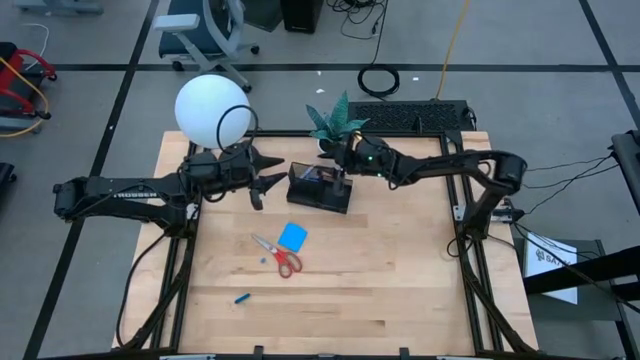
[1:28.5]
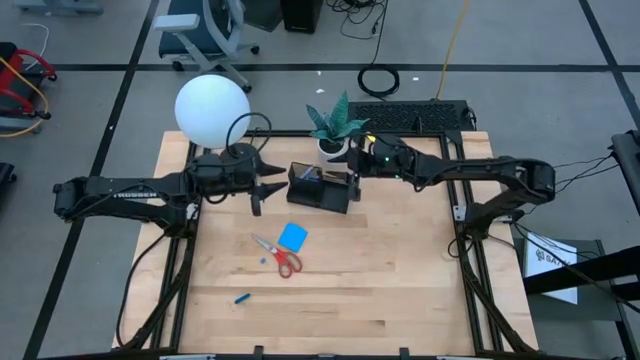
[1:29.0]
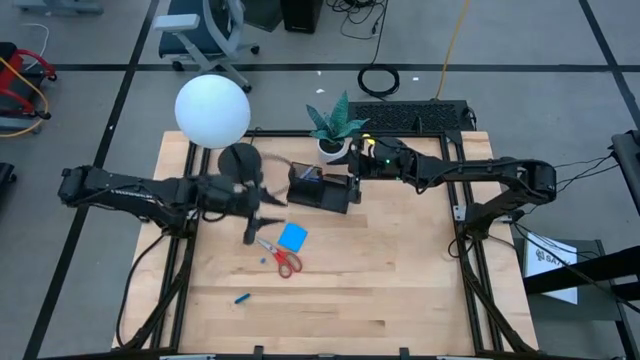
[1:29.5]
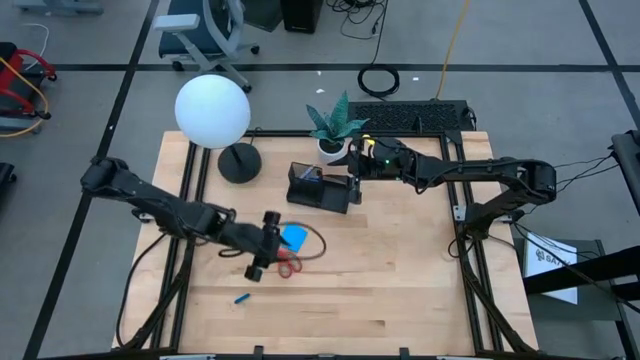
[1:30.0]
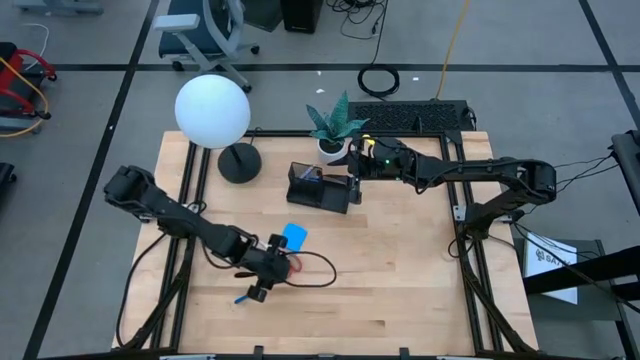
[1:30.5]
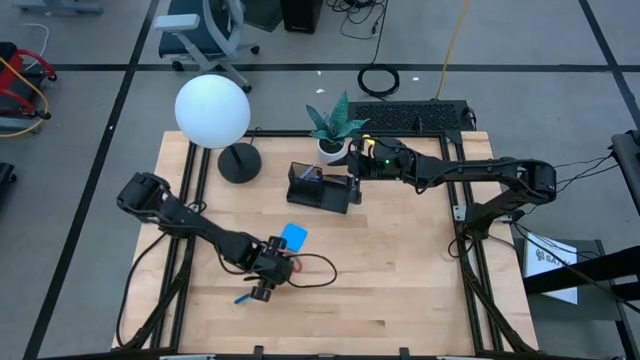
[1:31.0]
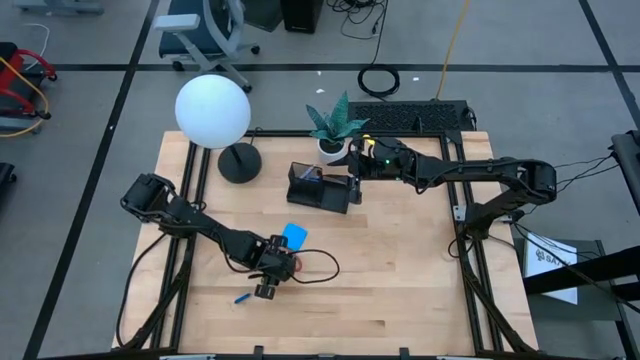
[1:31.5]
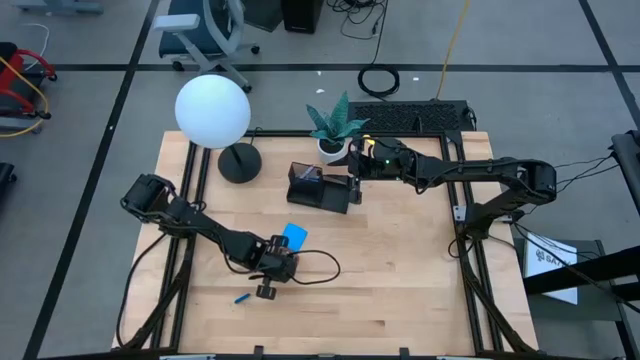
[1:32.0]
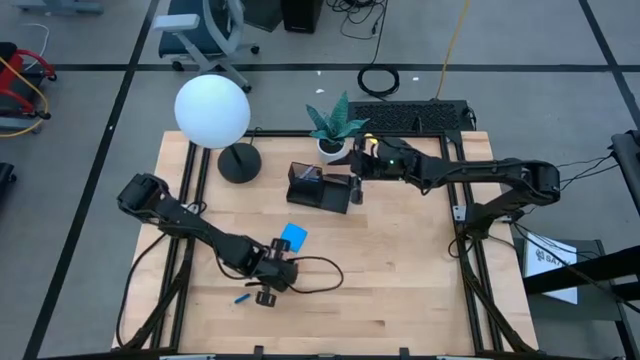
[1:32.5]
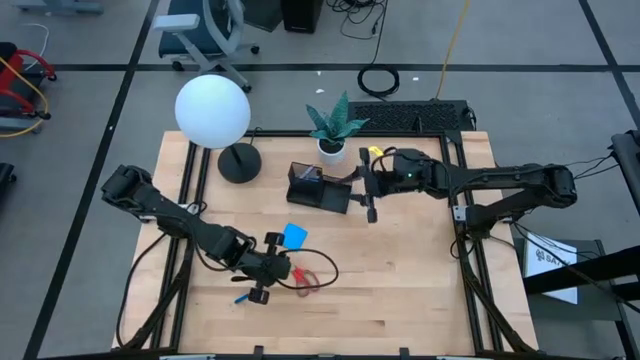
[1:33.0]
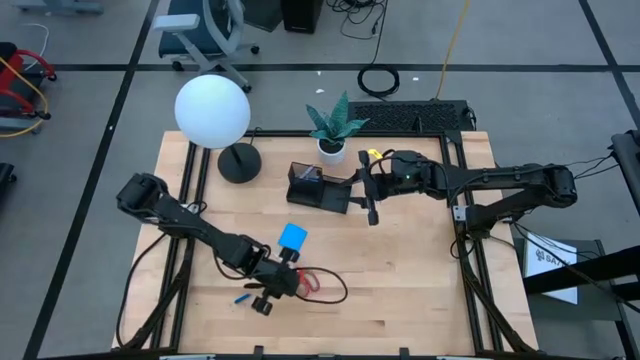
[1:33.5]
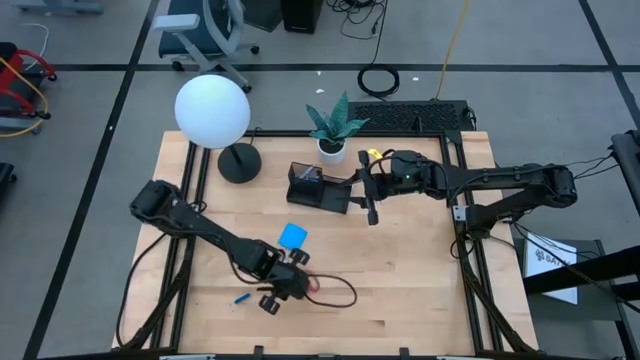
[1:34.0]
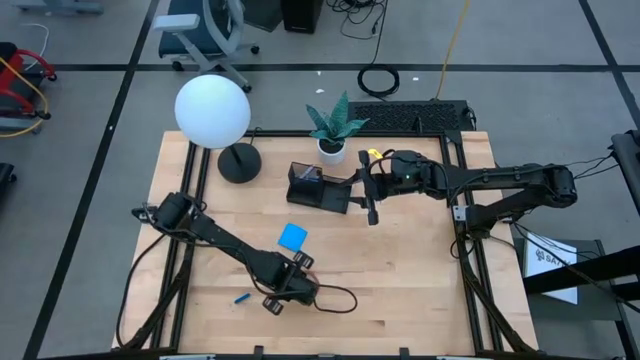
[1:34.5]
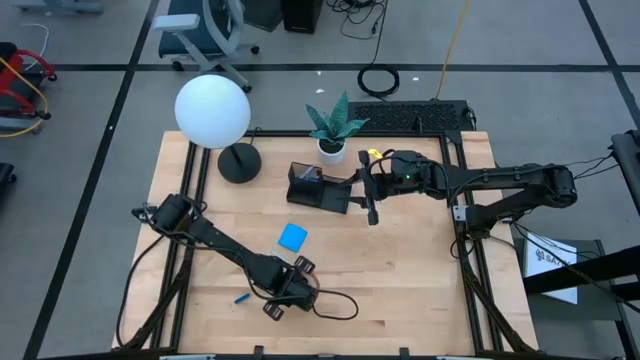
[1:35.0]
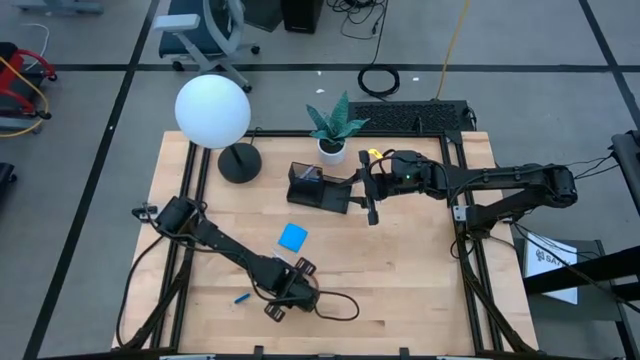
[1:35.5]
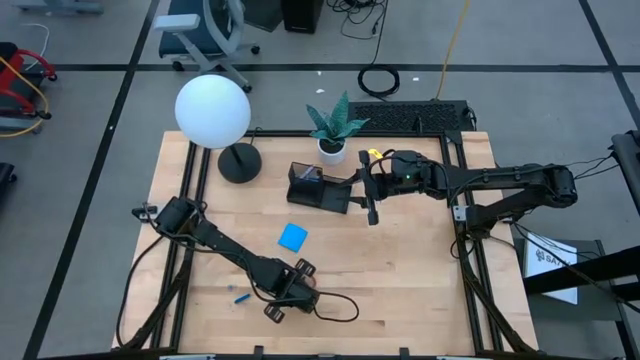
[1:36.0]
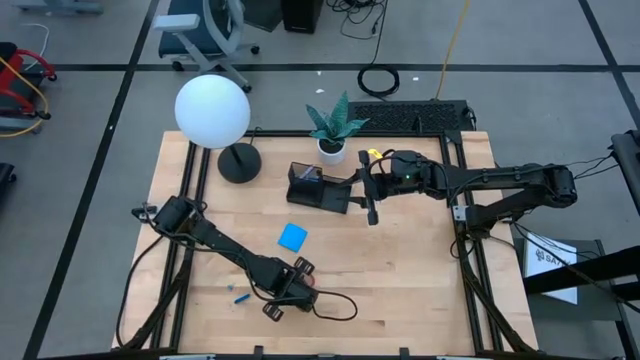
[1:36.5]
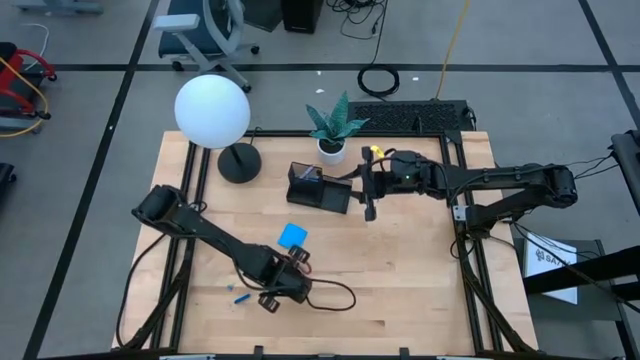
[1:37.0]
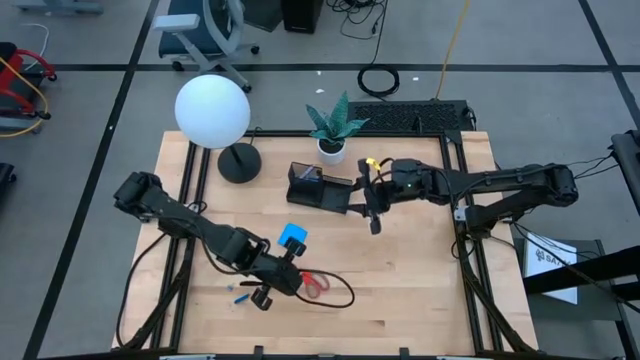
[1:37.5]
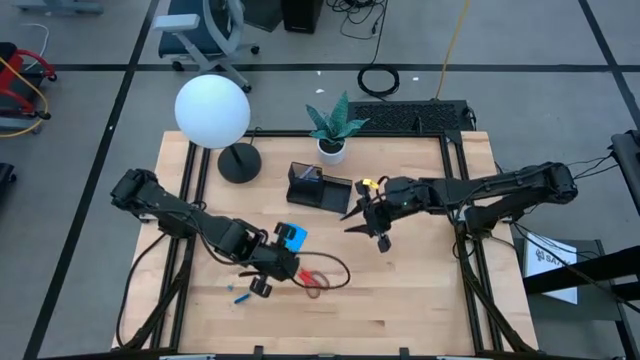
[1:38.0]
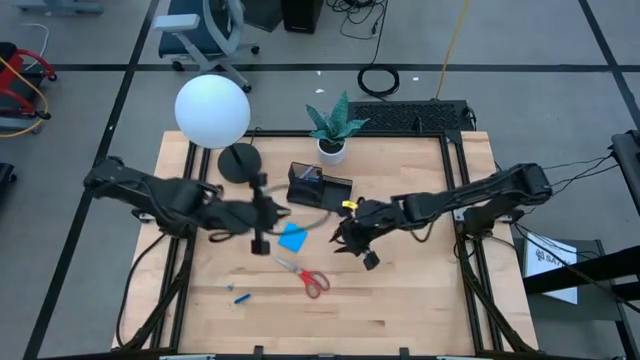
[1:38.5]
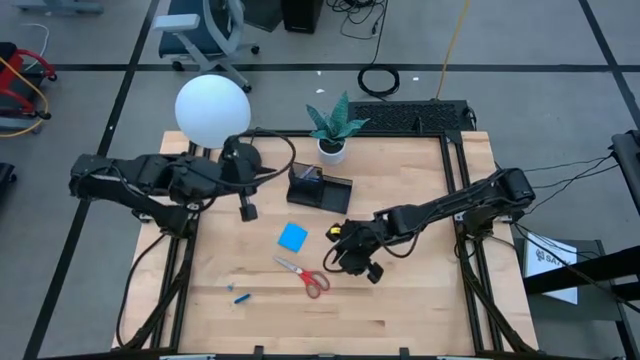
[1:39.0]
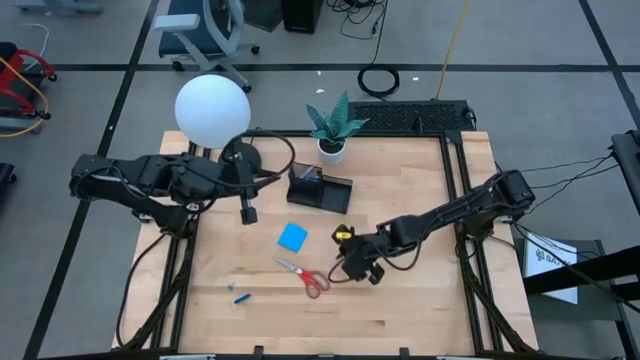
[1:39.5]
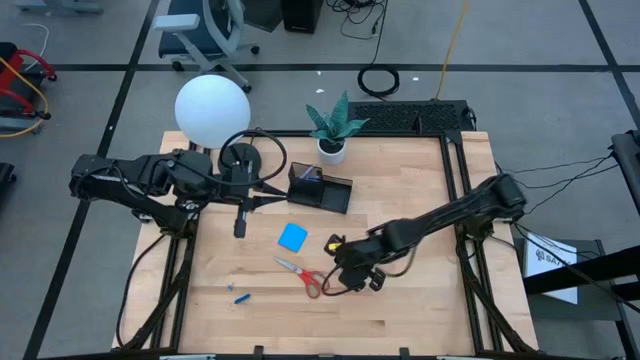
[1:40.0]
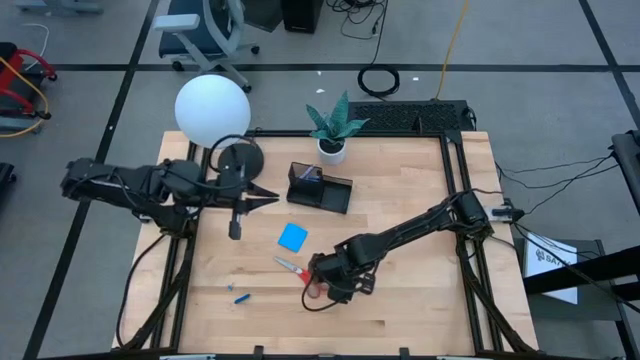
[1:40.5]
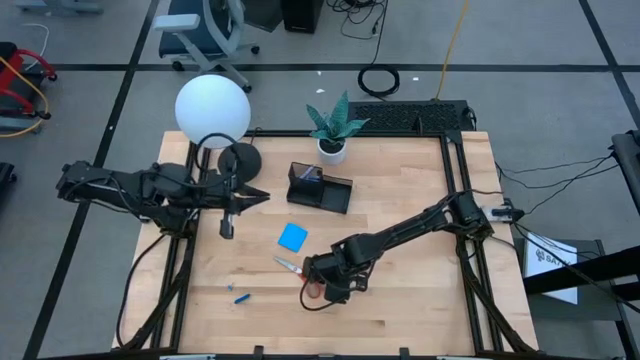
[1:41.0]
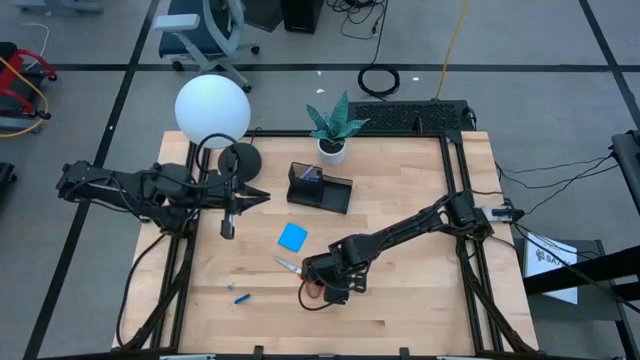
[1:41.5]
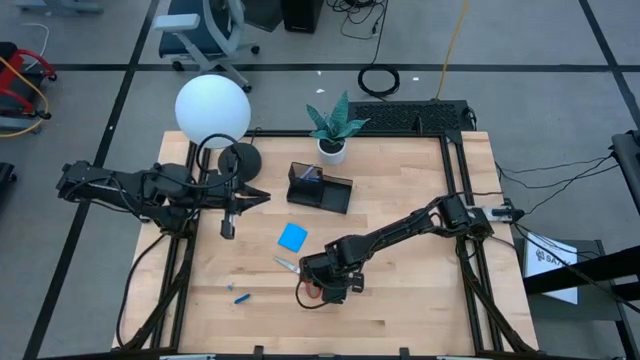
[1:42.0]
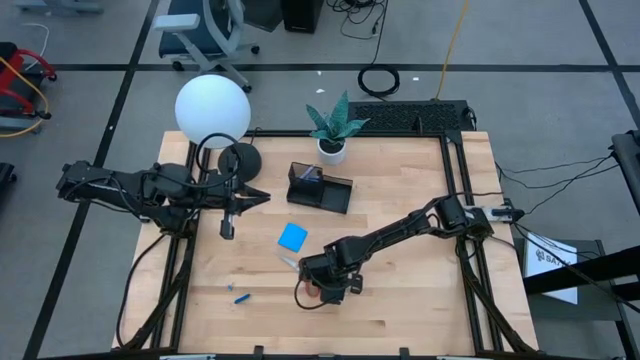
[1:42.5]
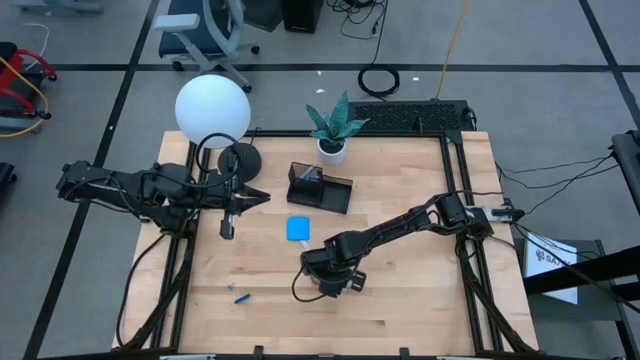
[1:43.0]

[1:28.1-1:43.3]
Task: Pick and place office supplies into organizer
Put the red scissors into the desk organizer

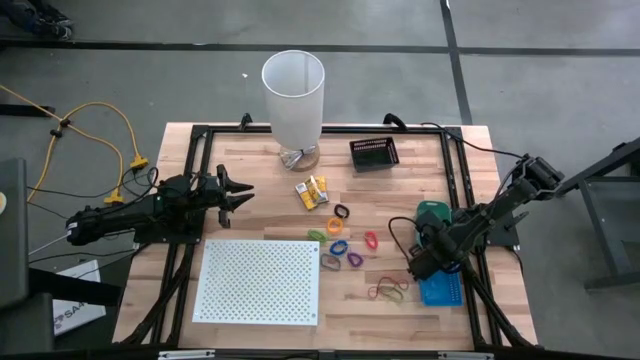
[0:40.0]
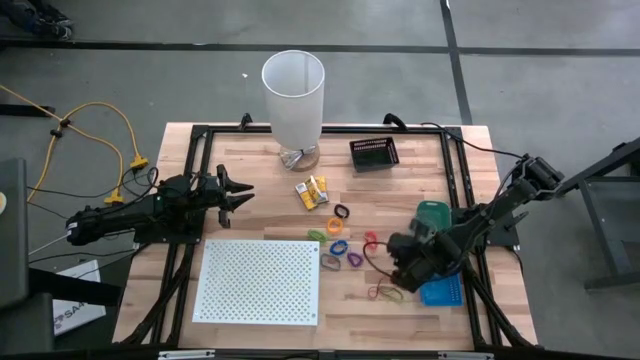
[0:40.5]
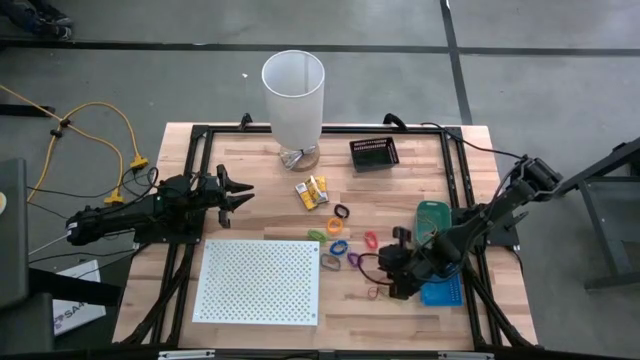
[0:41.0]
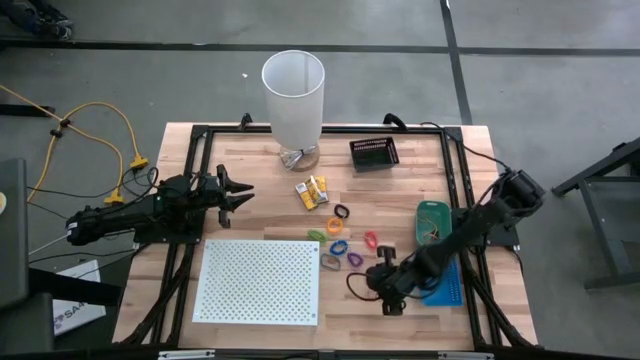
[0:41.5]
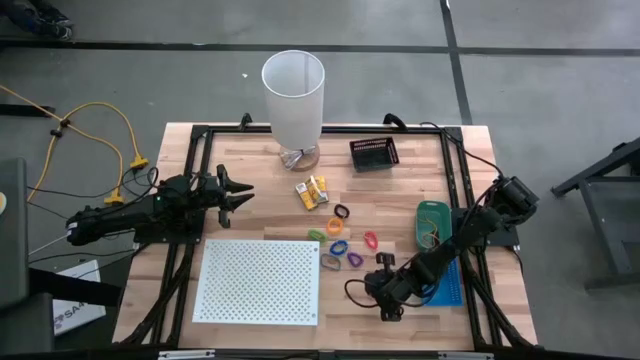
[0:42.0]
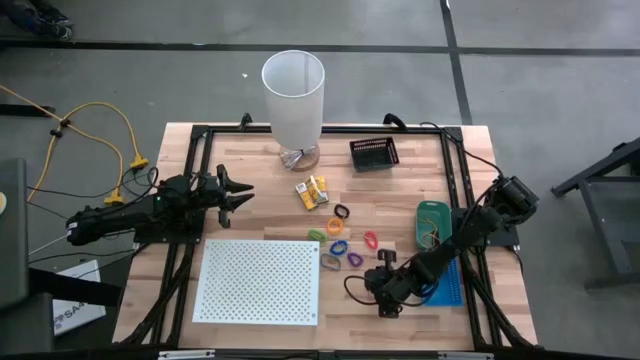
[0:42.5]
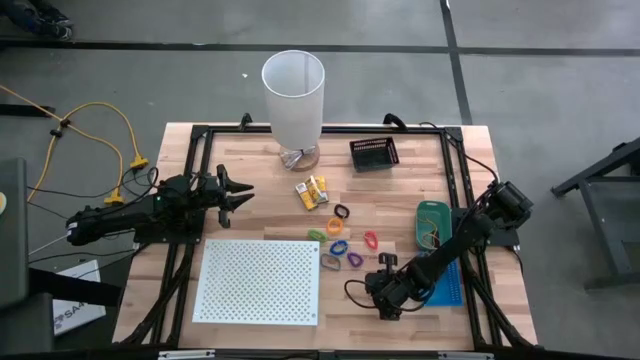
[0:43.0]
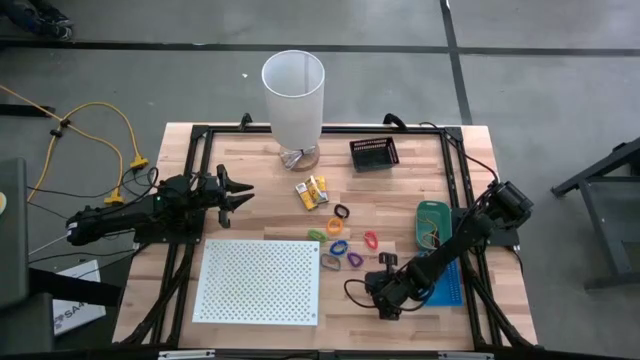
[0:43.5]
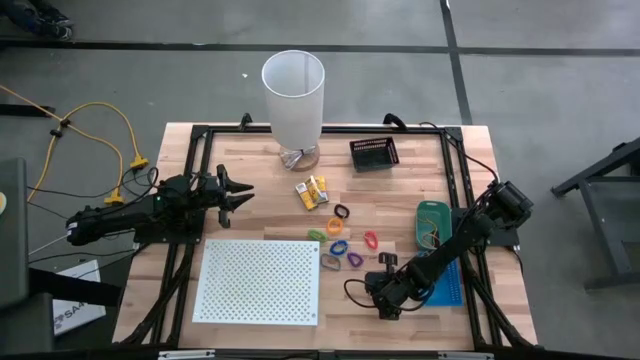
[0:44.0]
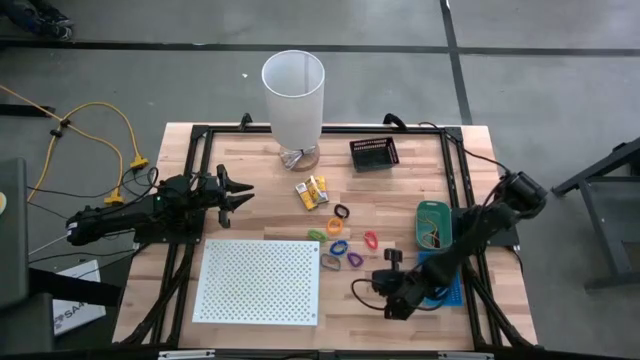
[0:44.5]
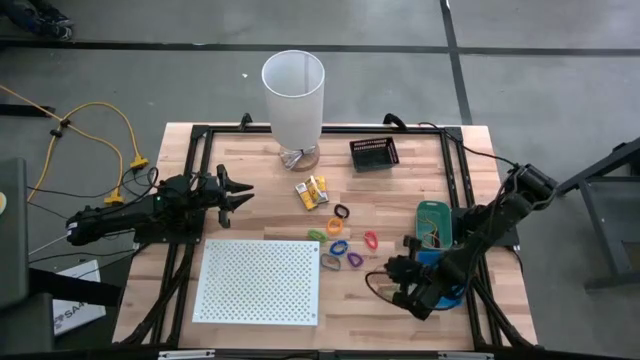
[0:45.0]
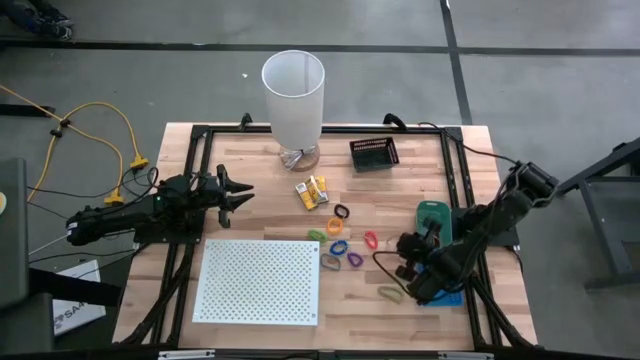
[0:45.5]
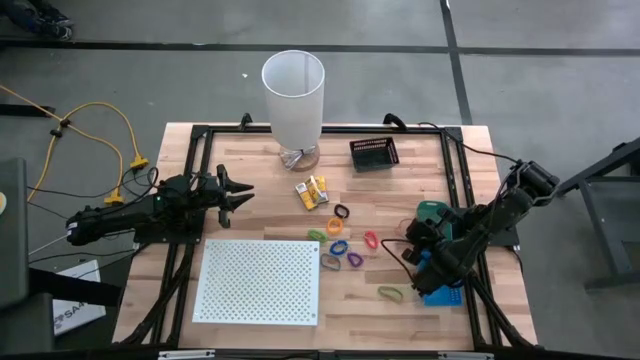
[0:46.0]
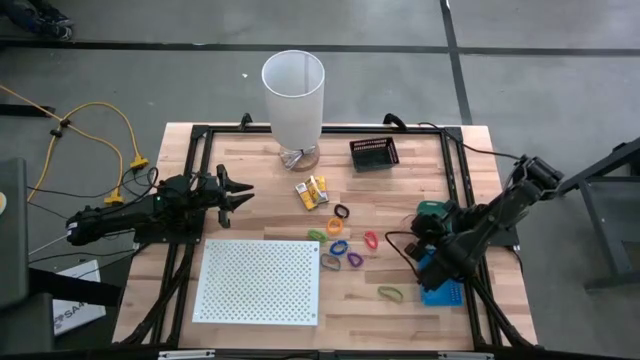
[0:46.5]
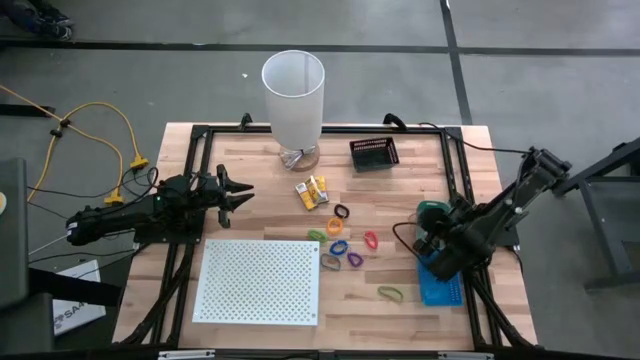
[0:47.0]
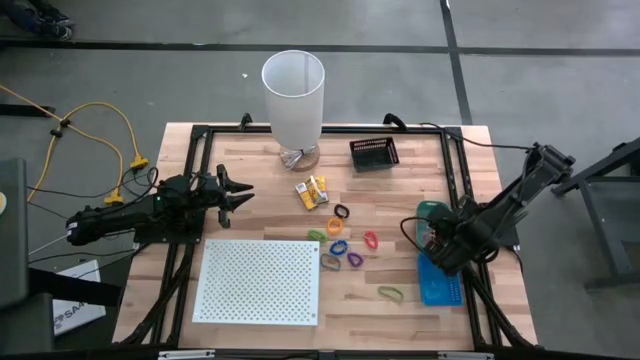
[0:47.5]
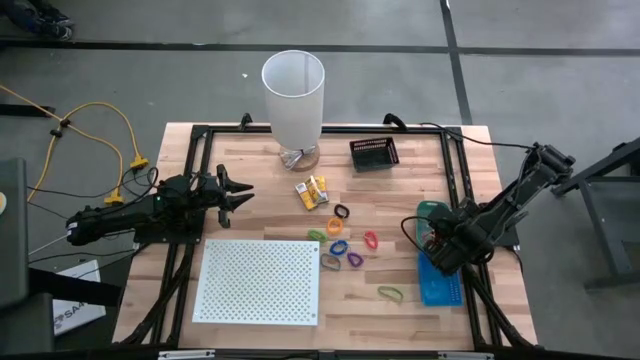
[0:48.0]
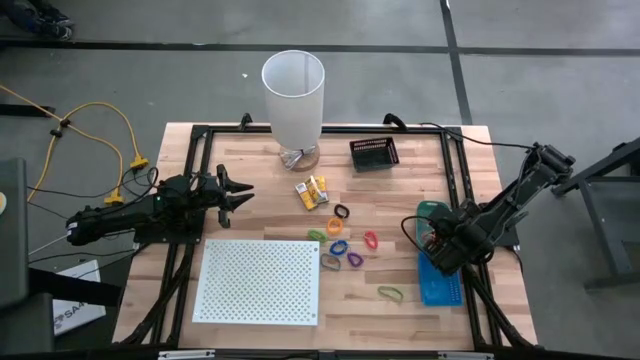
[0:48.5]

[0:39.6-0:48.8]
Task: Pick & Place Office Desk Supplies
Put the red rubber band into the green bin
